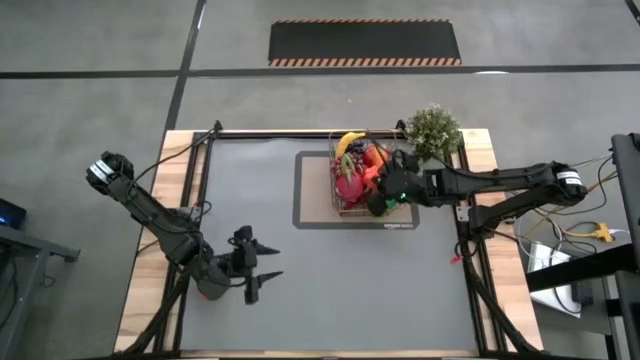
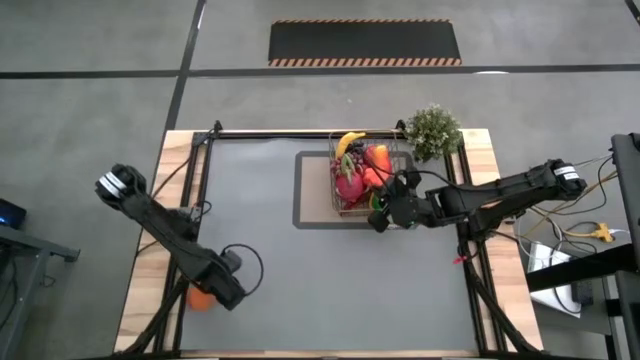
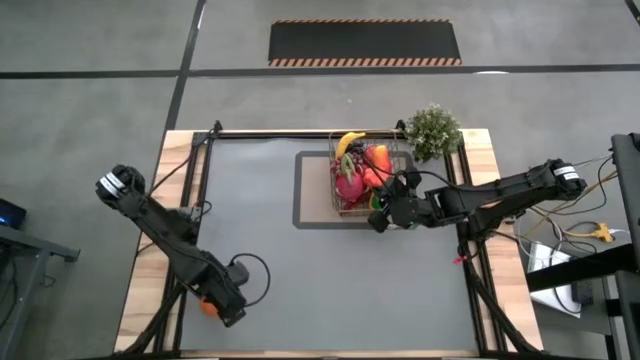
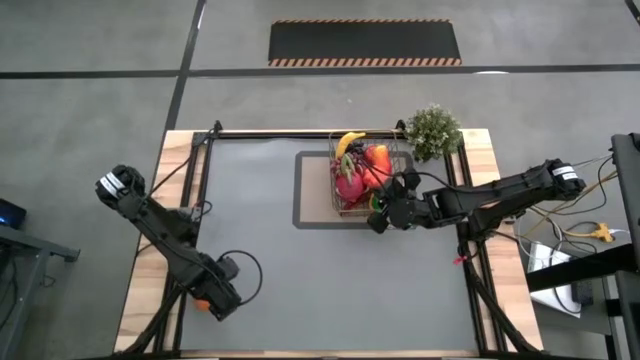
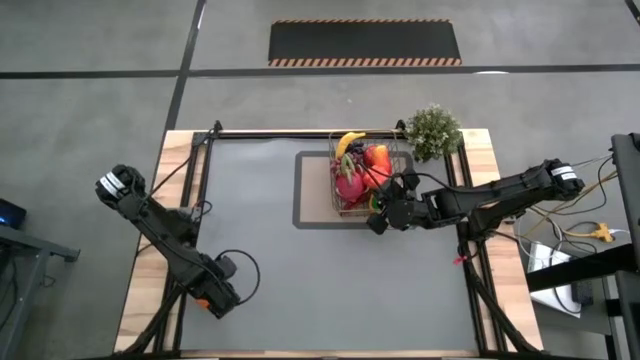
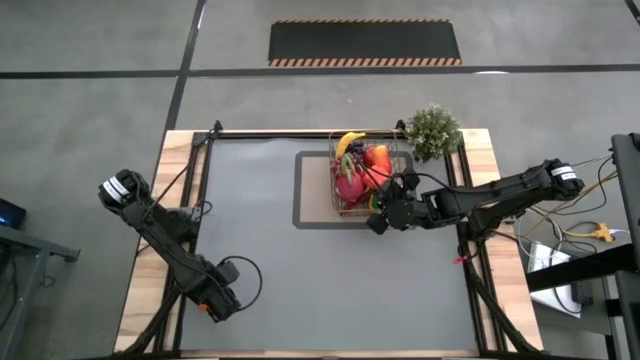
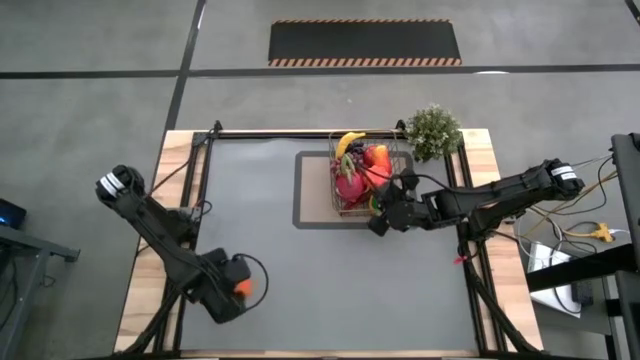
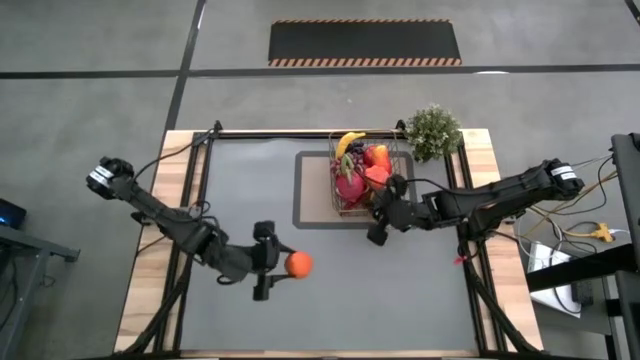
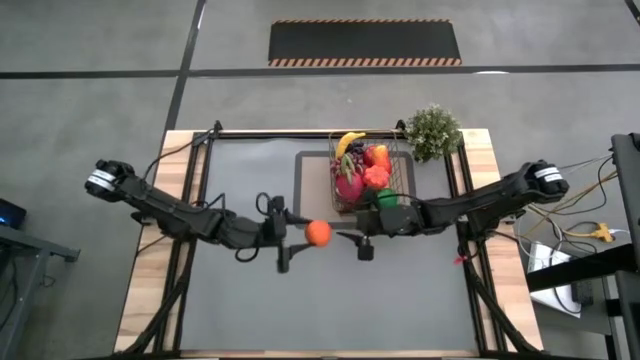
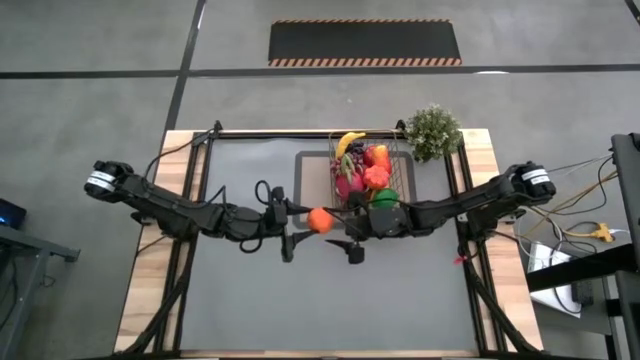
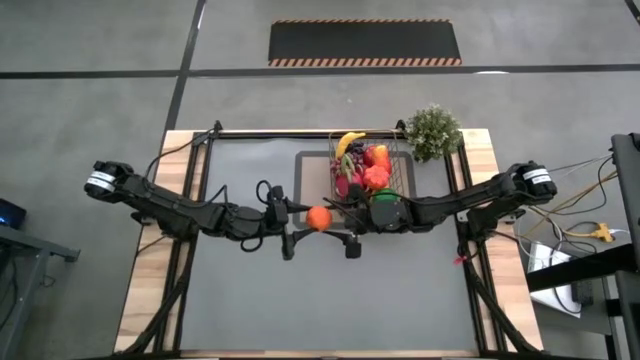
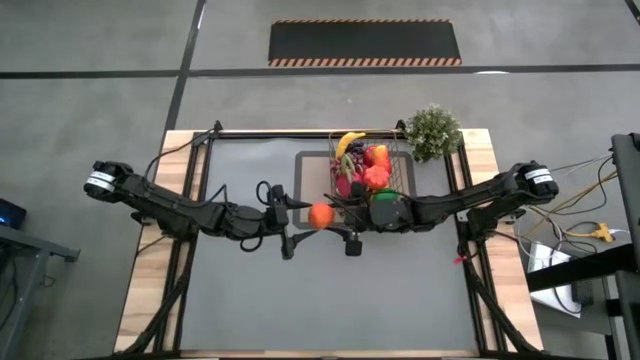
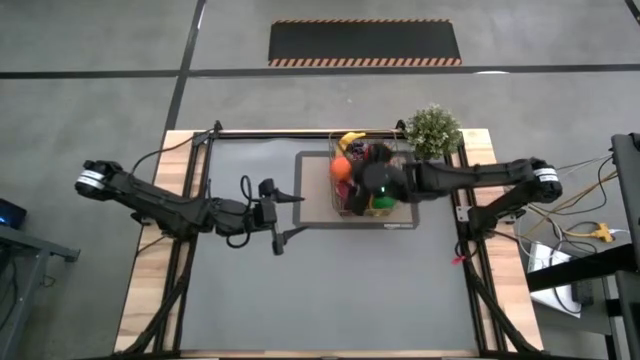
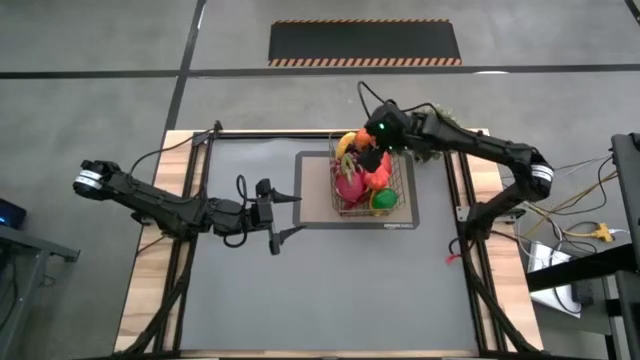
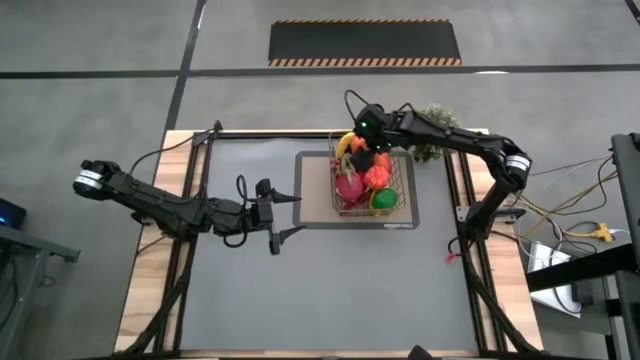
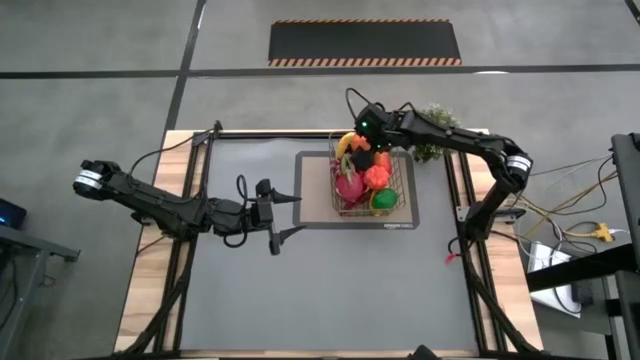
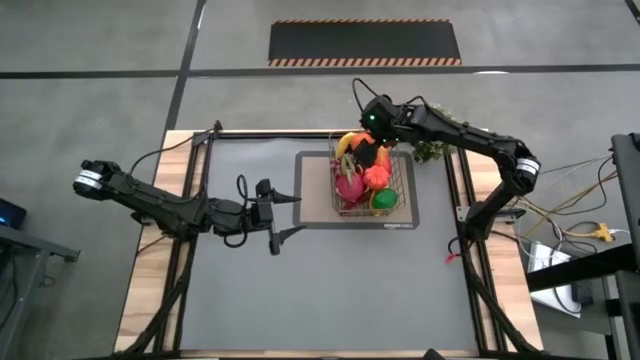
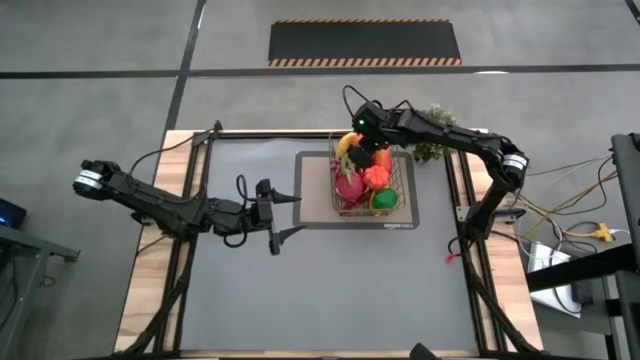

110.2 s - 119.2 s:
Task: Build produce basket
Put the orange into the wire basket

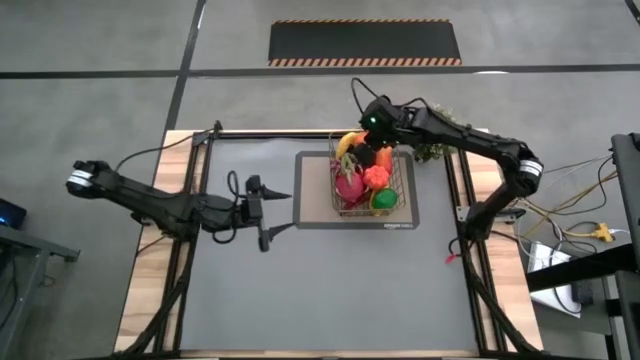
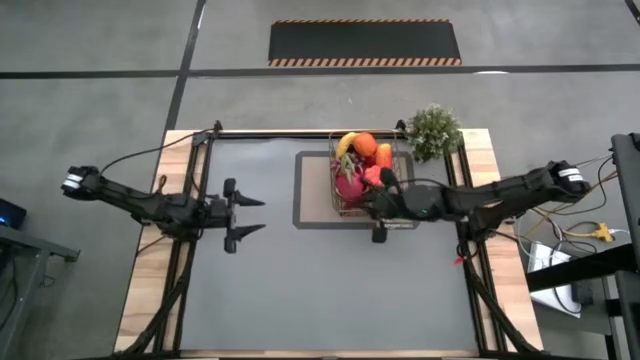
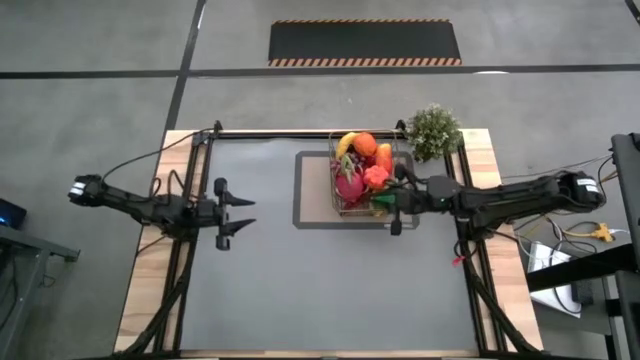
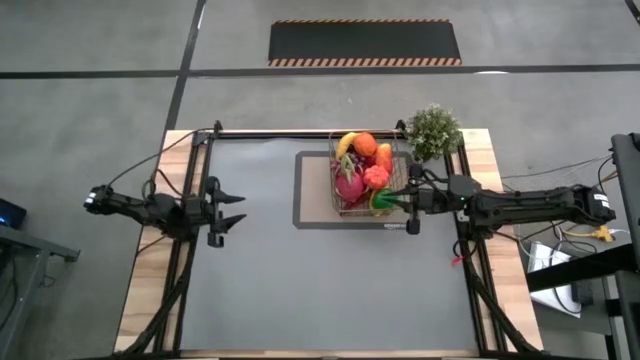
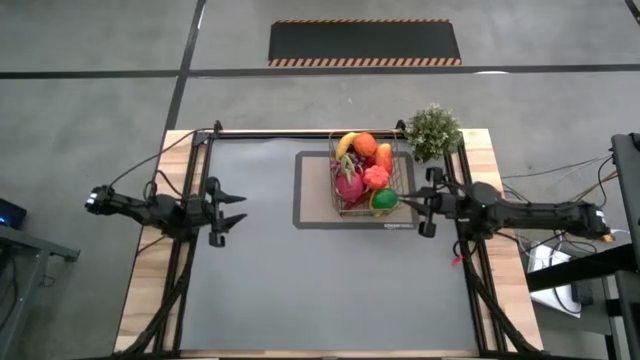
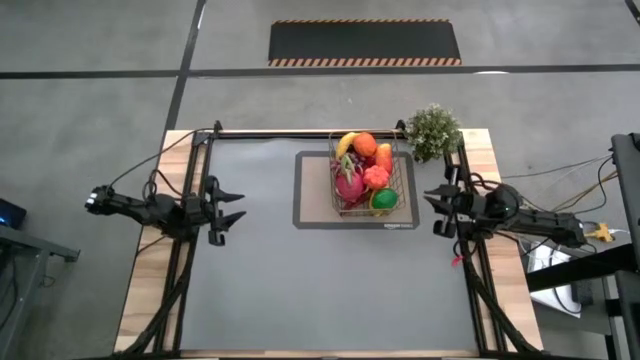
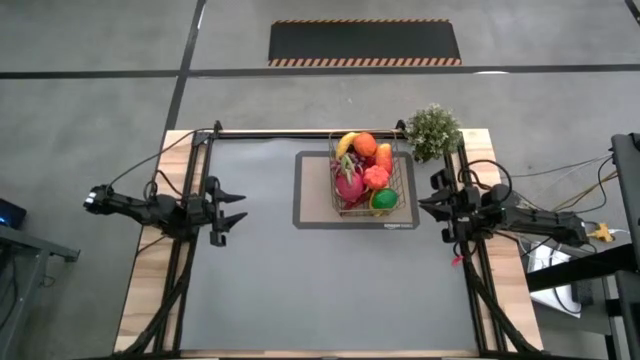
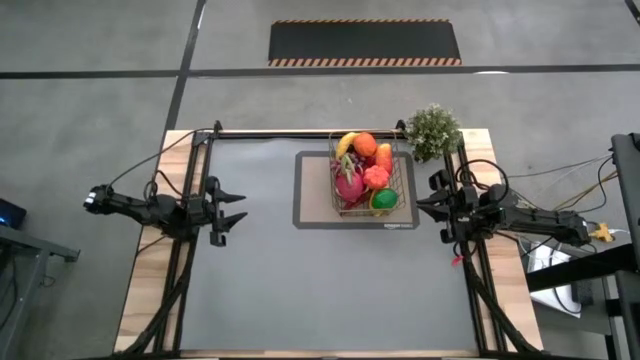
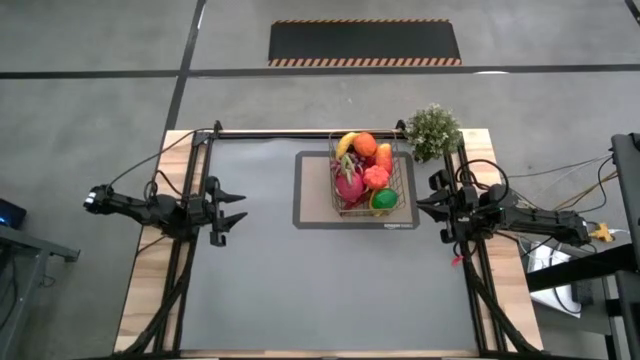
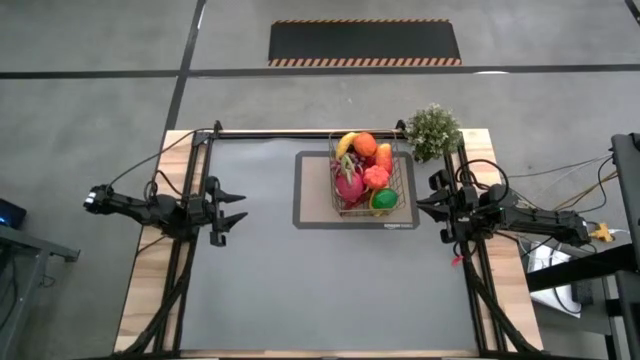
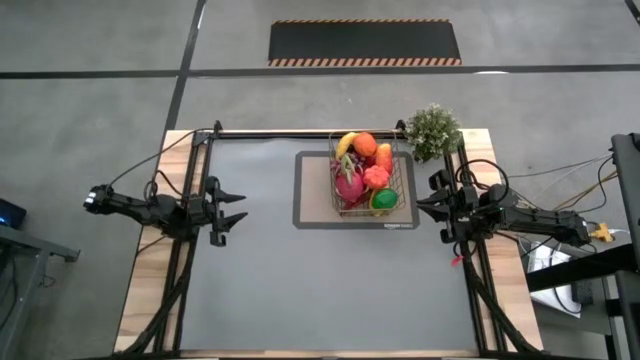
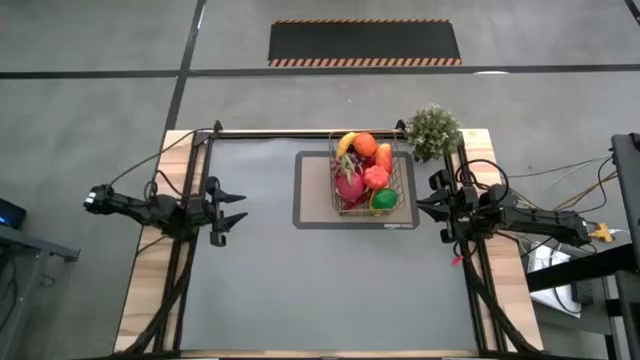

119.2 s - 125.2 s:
Return to Home Position

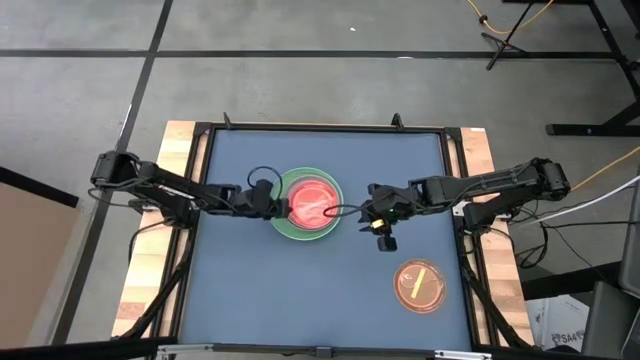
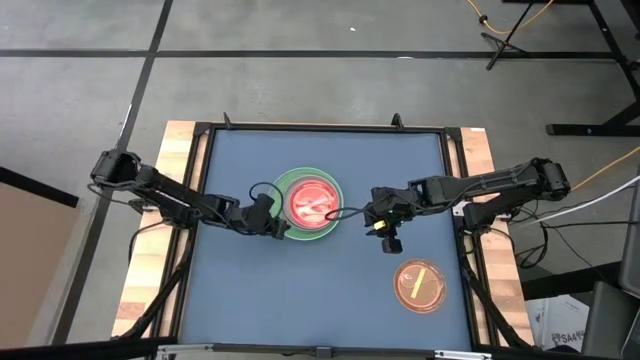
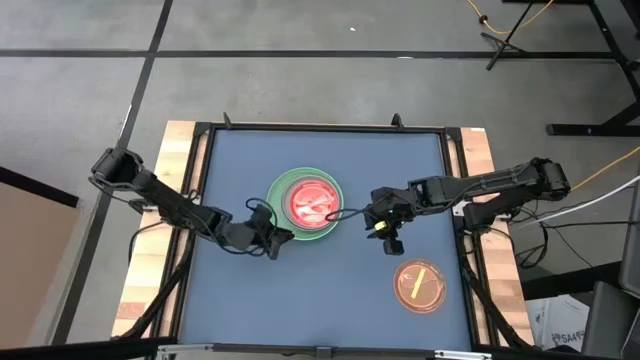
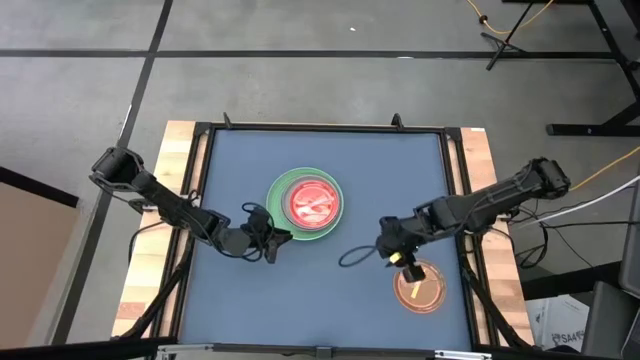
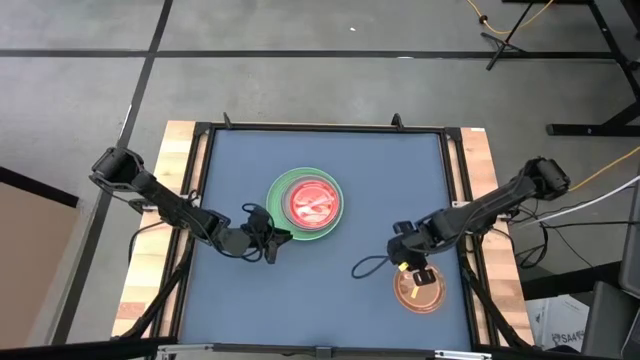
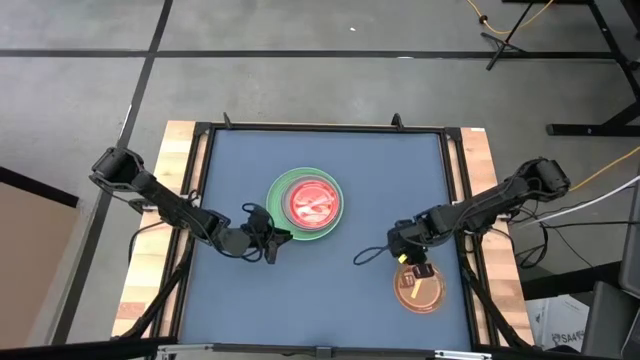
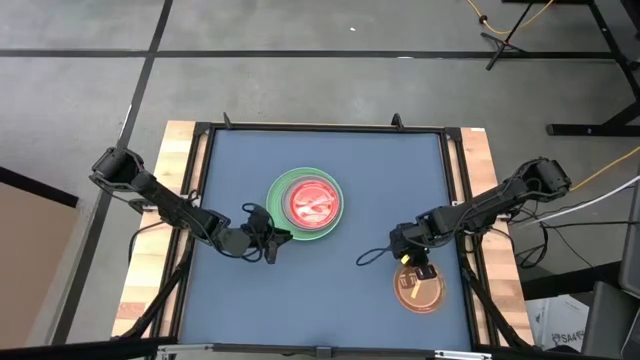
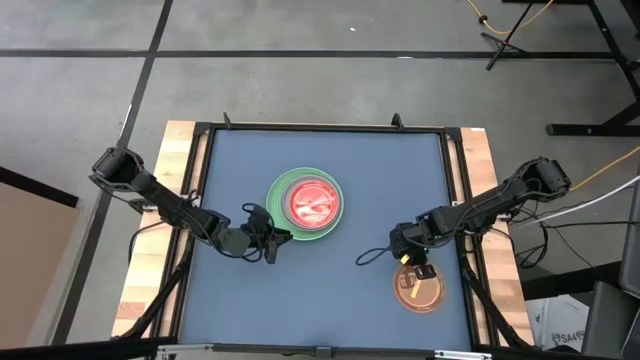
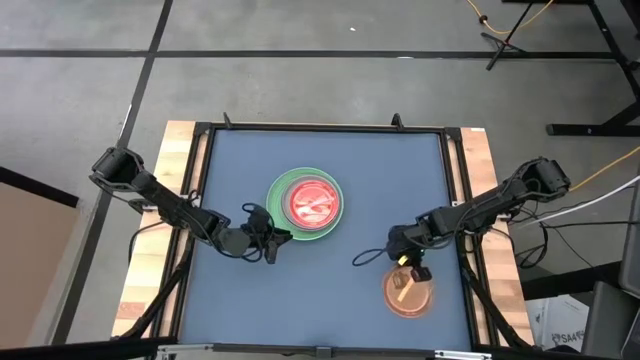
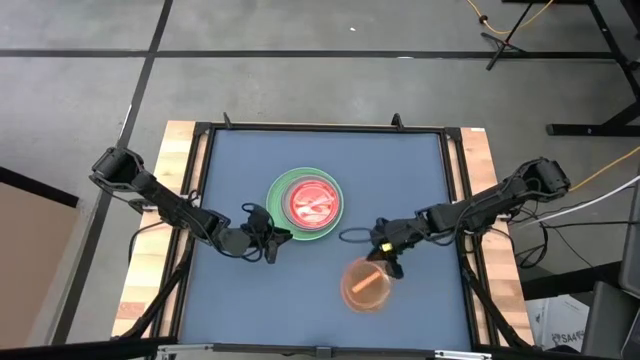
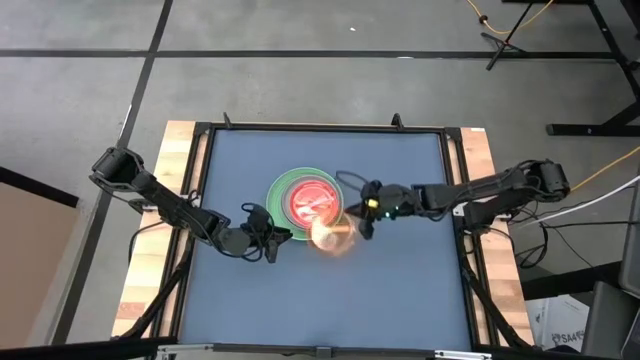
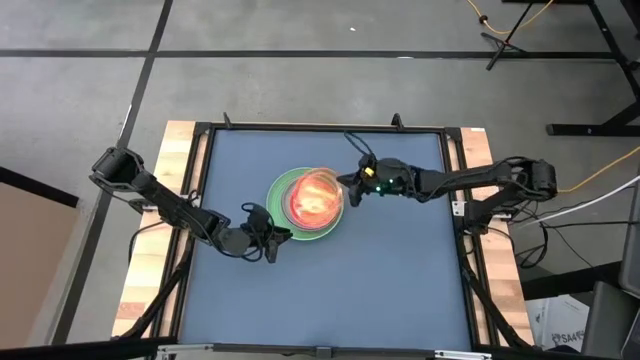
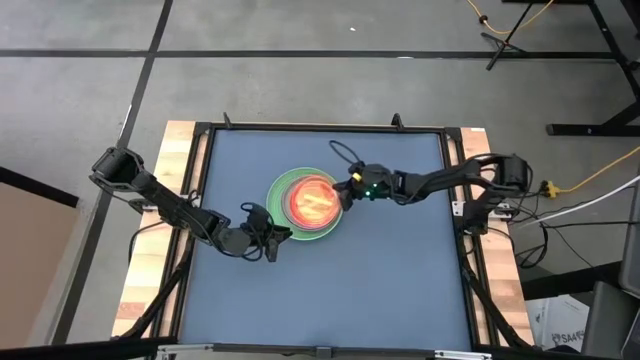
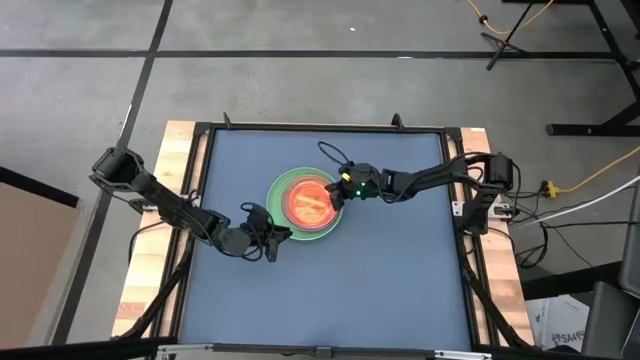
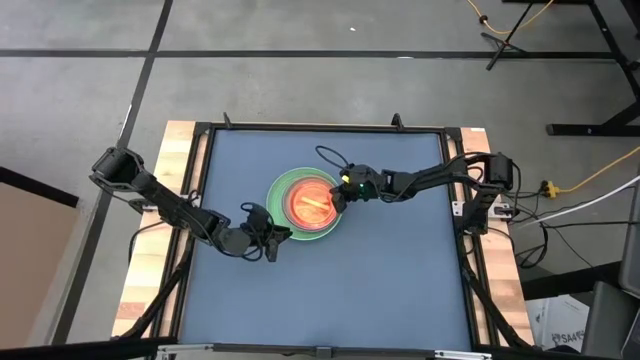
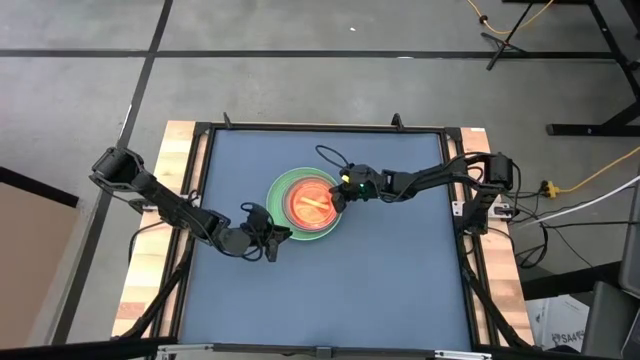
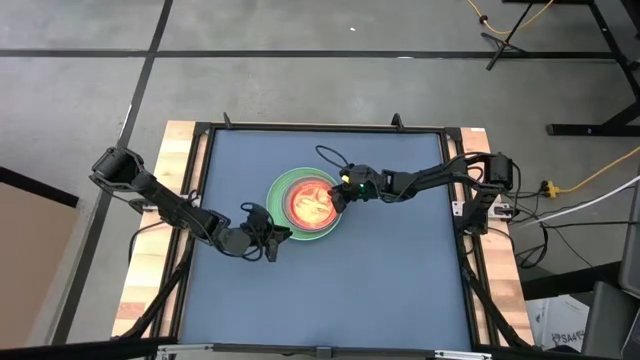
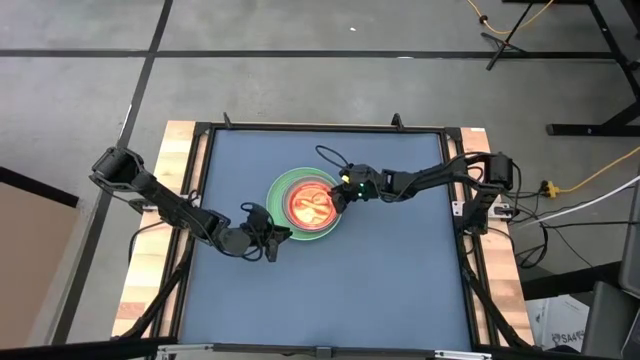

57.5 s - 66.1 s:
Task: Stack plastic plates
Stack the transparent orange plate on the transparent pink plate
